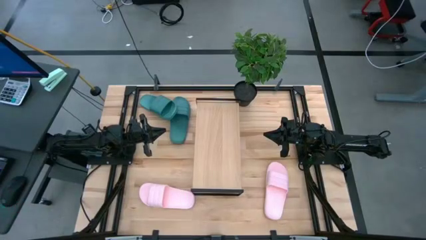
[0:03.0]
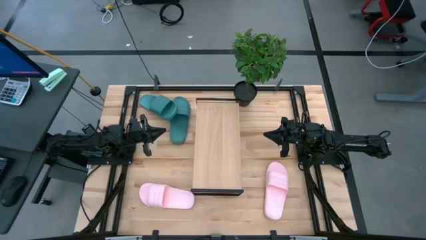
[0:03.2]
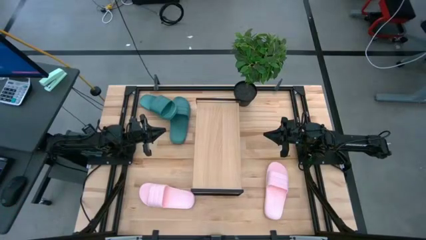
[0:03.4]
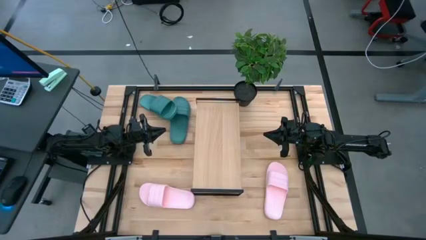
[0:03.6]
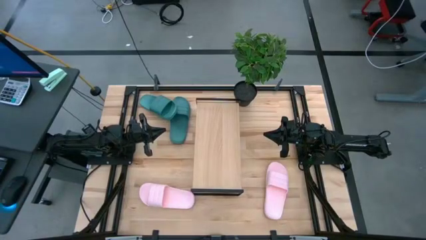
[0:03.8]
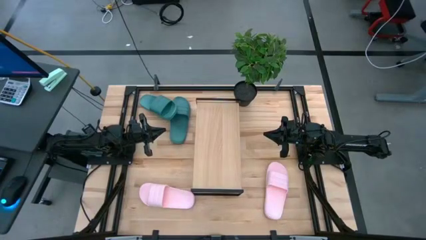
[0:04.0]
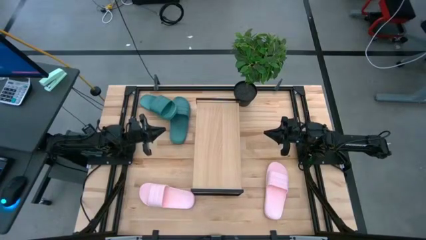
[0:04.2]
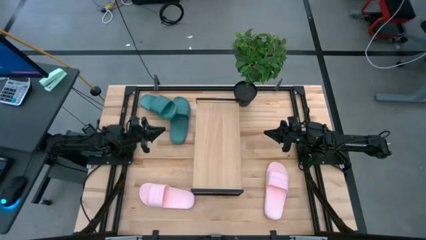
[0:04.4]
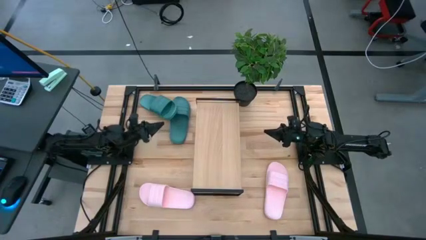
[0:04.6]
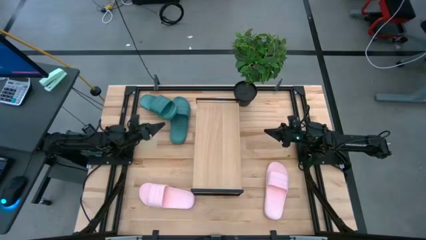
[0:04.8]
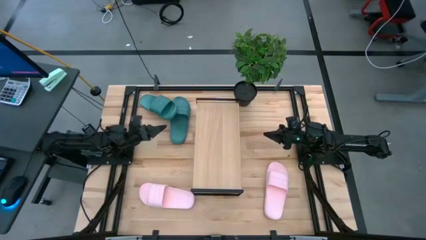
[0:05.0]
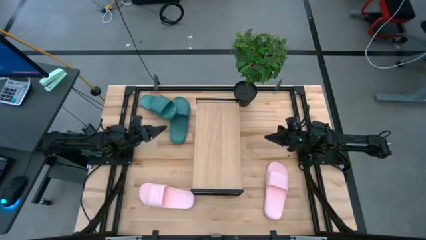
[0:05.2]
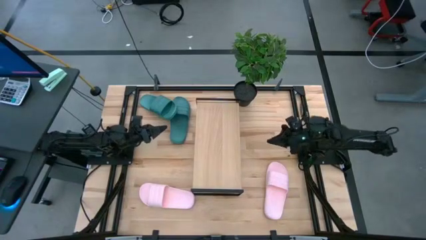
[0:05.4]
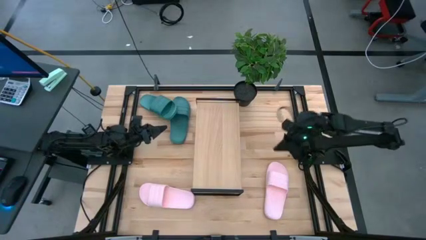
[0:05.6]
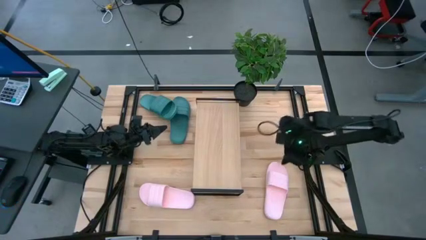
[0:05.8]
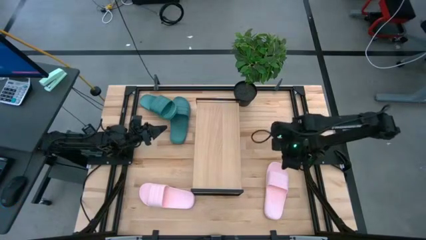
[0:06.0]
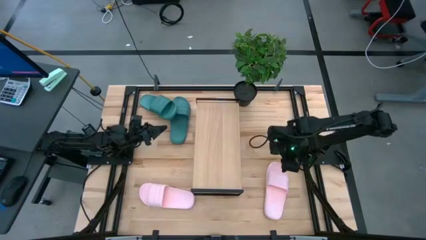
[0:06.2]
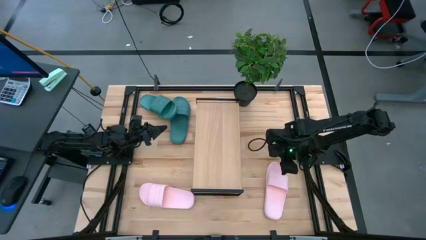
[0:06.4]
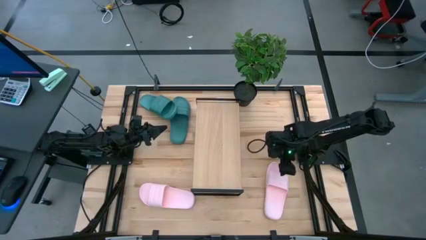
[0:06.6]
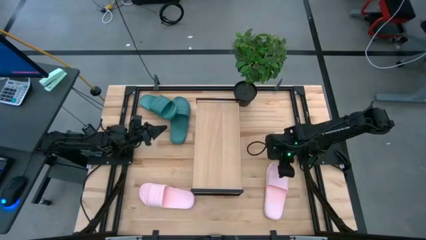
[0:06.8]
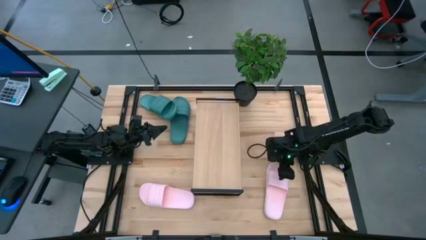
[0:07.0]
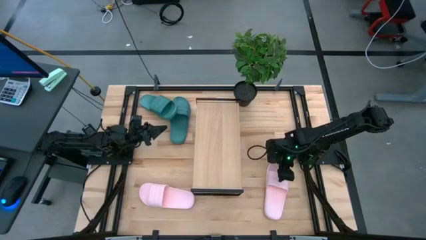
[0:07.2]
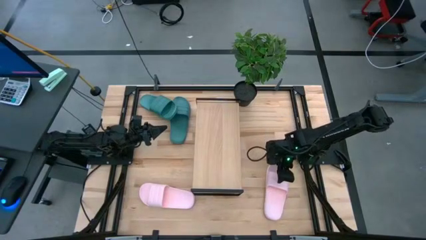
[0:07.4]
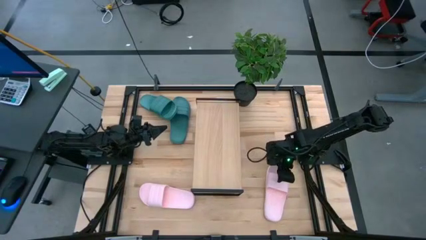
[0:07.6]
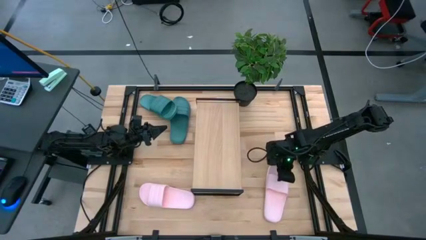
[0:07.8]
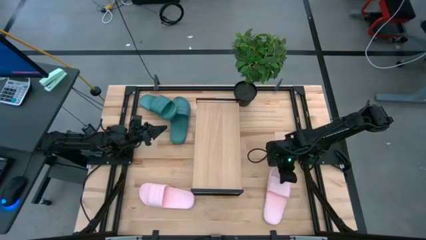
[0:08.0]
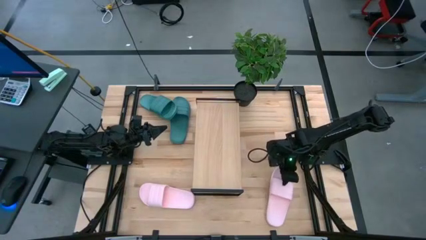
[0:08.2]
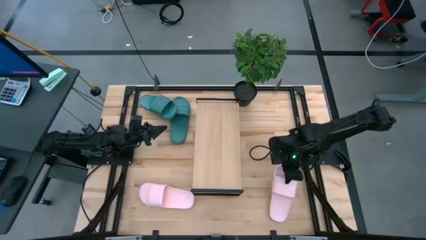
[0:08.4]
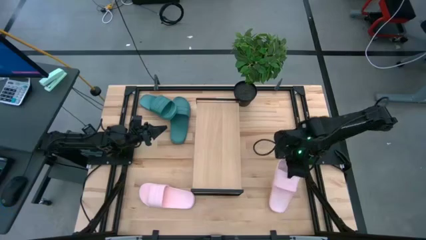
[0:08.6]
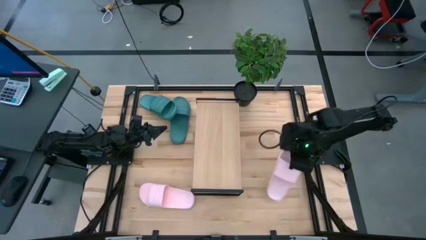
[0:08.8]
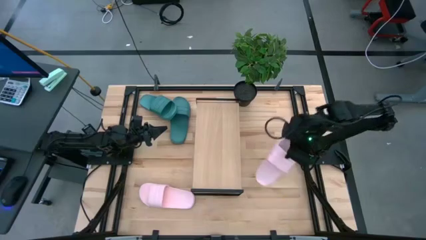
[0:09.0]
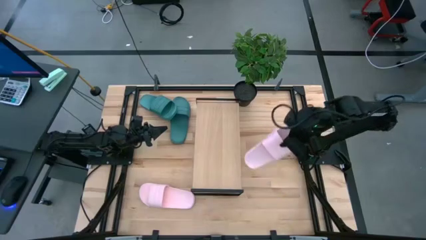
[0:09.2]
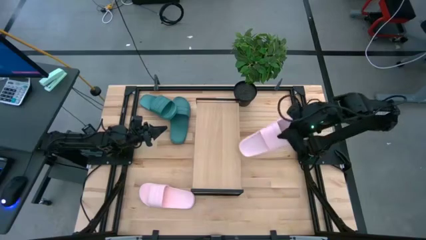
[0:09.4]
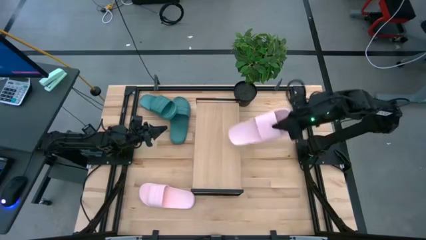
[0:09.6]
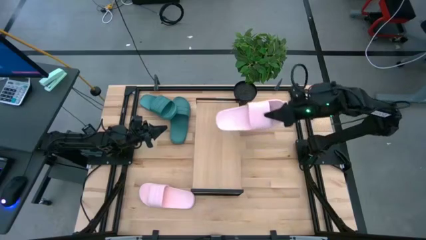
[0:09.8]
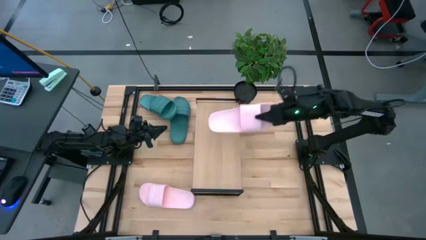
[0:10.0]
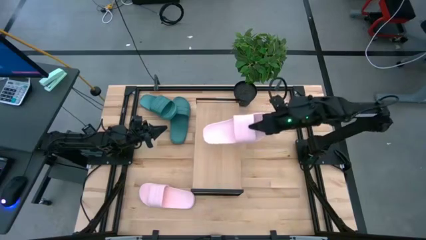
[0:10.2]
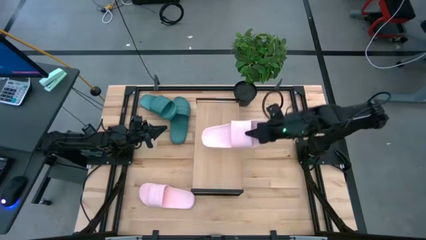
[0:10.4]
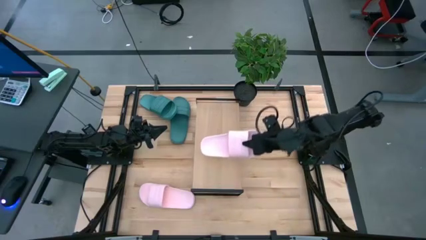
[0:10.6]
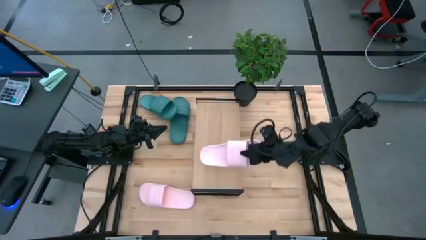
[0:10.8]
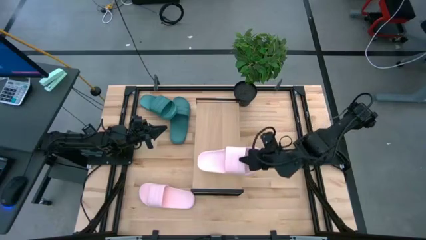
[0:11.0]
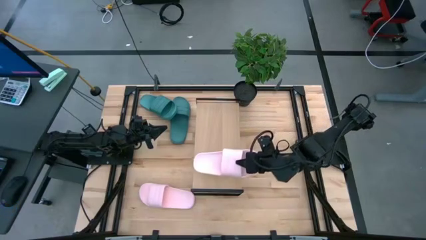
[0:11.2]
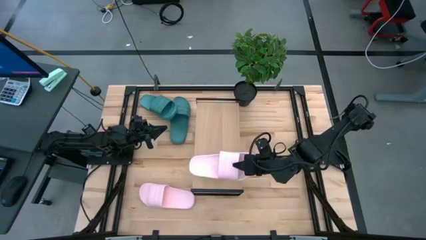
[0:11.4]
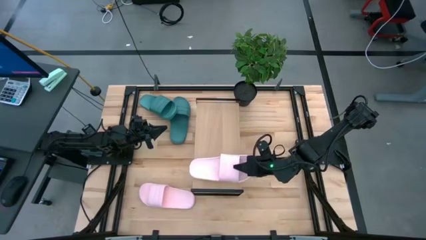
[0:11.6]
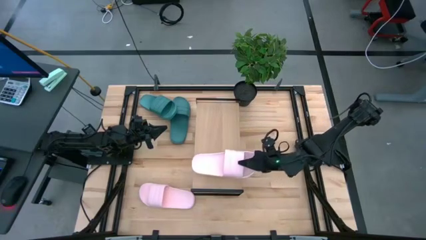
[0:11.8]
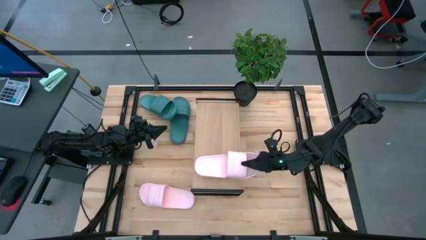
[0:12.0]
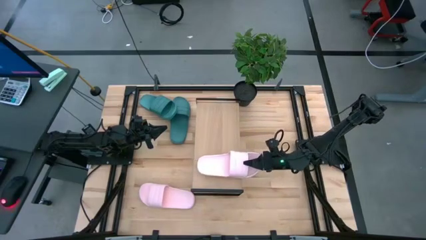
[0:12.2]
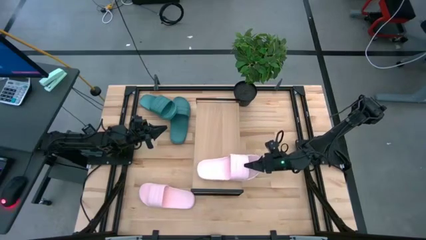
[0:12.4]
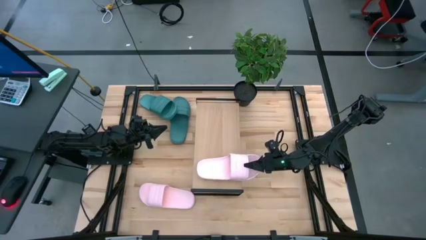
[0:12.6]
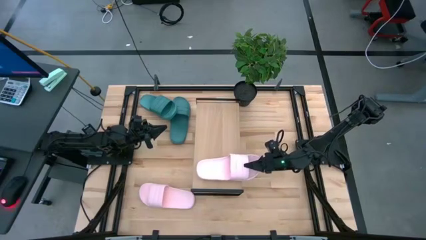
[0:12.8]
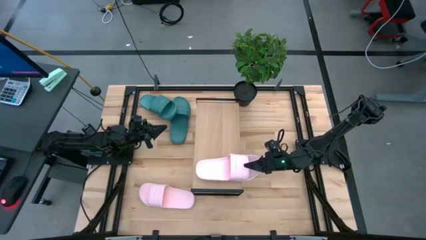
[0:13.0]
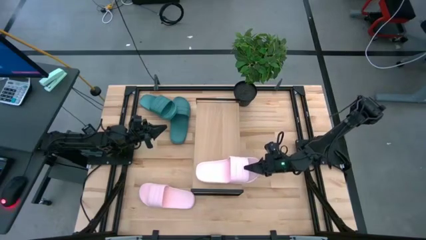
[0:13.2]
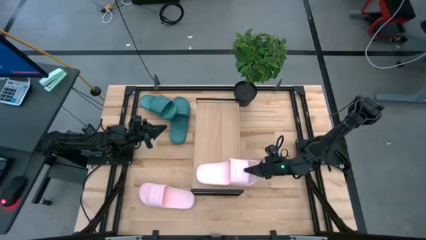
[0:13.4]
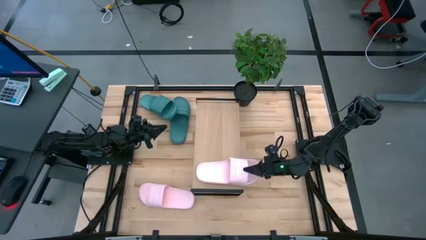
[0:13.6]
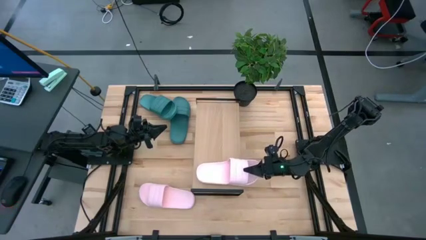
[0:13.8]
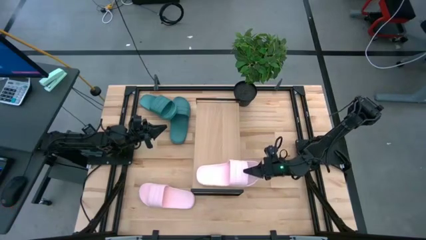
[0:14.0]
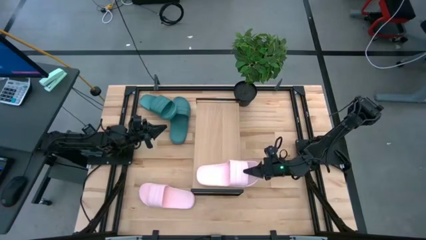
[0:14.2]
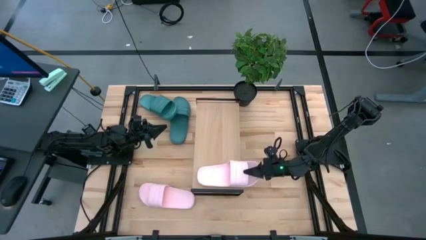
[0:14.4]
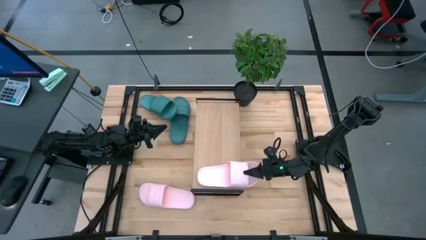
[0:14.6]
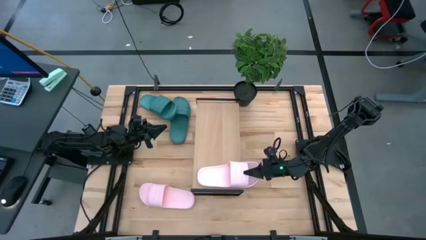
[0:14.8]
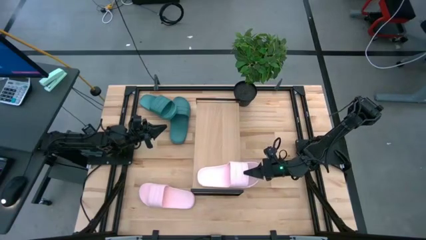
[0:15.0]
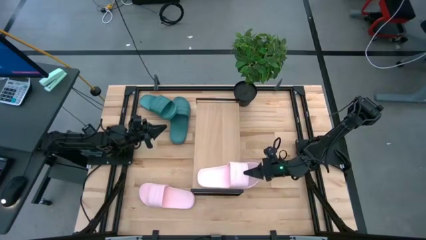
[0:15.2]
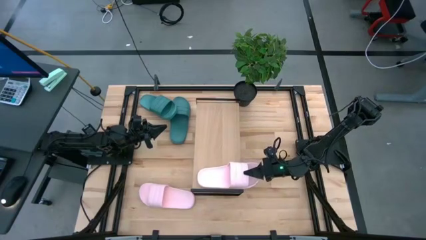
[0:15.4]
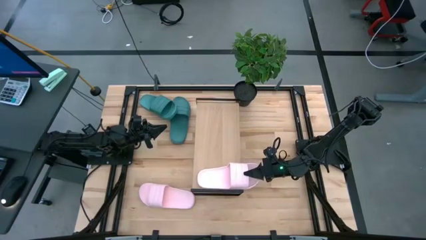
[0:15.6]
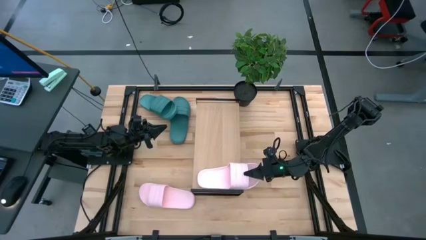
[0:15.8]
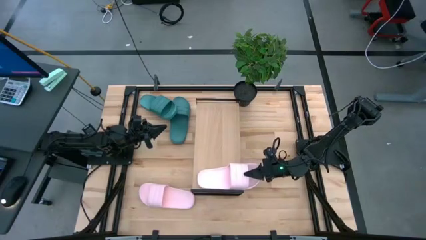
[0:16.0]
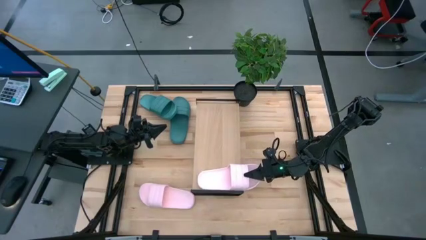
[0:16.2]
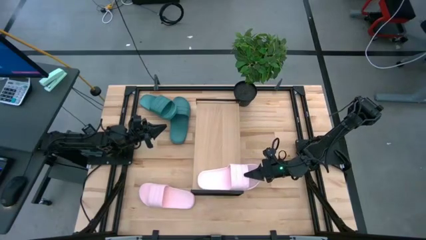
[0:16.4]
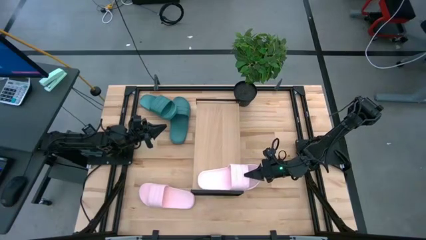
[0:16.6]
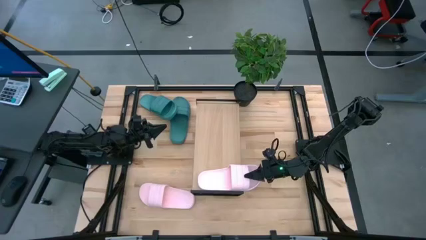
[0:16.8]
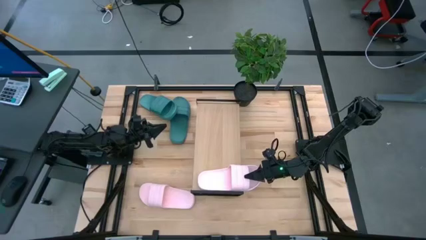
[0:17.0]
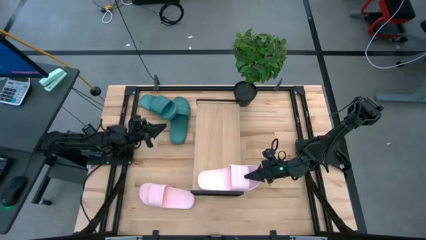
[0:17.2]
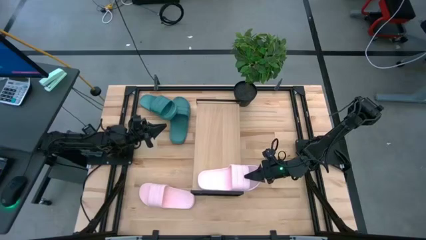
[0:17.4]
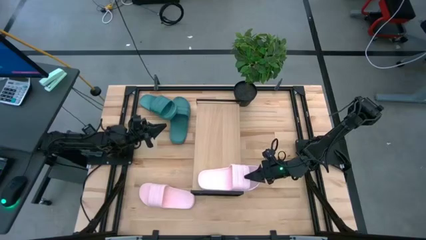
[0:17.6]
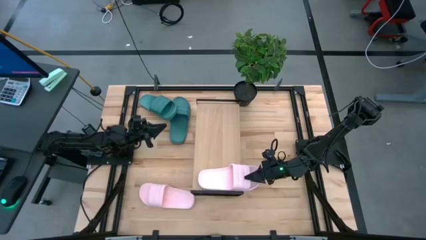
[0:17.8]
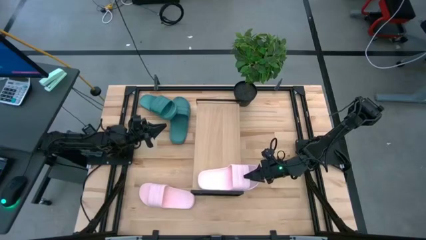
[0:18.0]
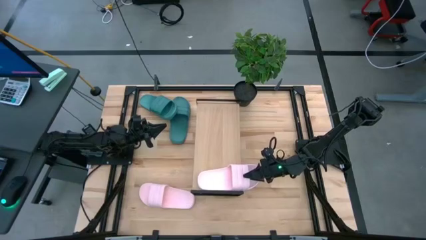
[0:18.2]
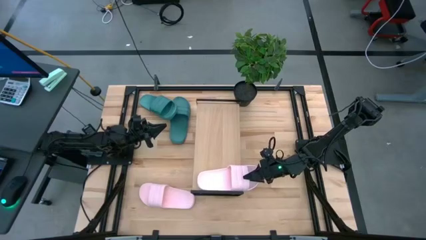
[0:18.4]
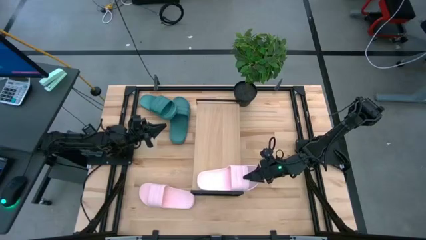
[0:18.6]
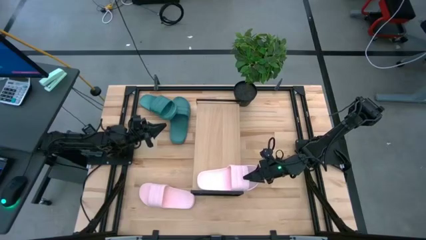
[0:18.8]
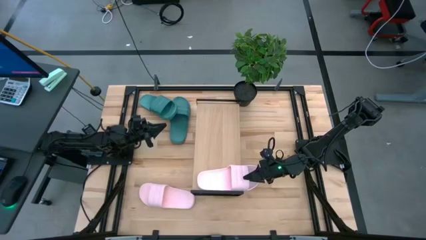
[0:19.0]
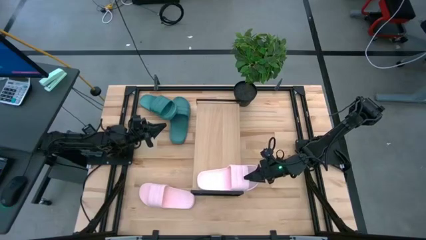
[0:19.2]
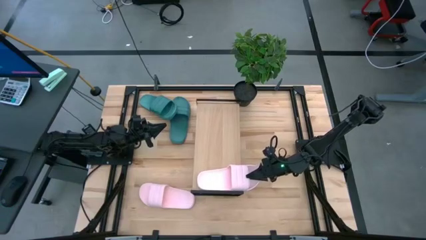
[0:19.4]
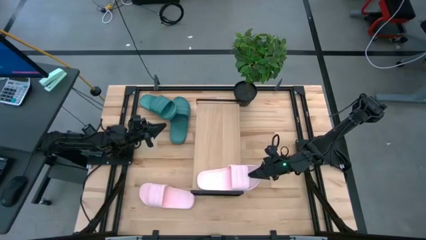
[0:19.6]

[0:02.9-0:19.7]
Task: Pick and place slides into the shelf
Put the right pink slide on the shelf
